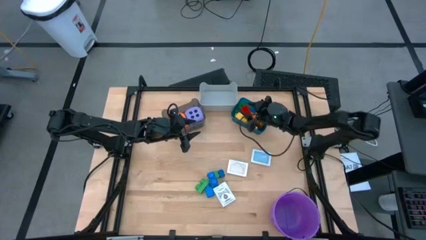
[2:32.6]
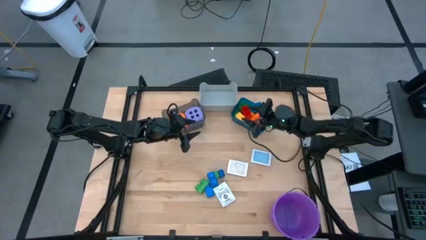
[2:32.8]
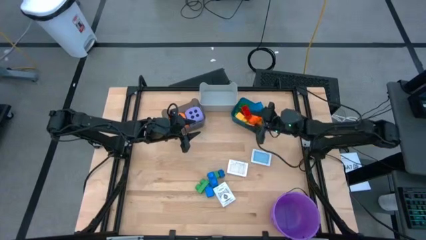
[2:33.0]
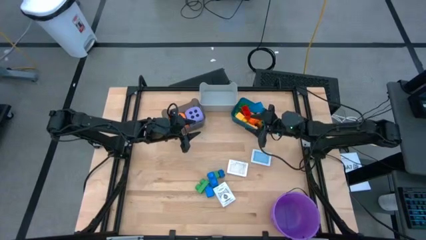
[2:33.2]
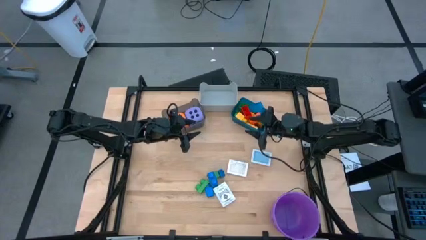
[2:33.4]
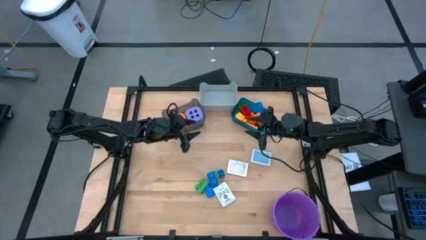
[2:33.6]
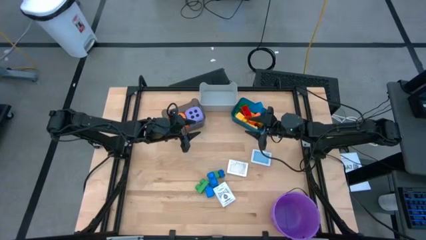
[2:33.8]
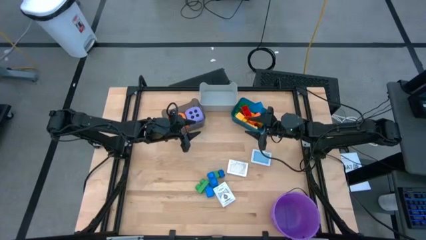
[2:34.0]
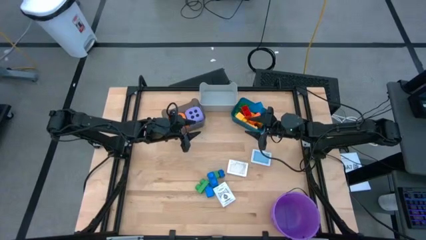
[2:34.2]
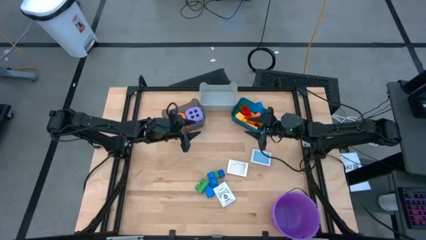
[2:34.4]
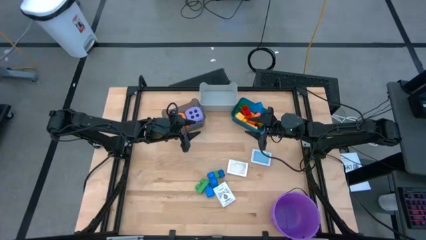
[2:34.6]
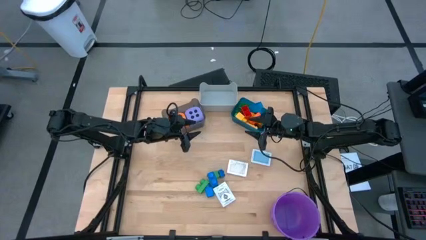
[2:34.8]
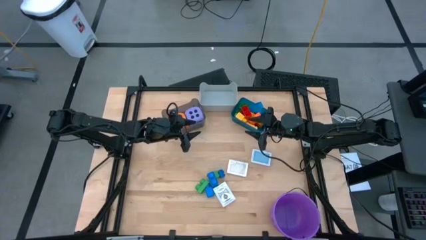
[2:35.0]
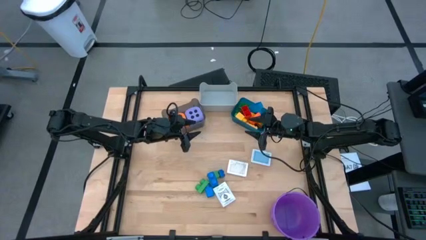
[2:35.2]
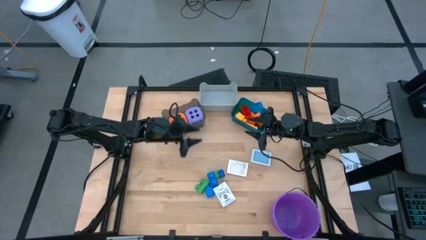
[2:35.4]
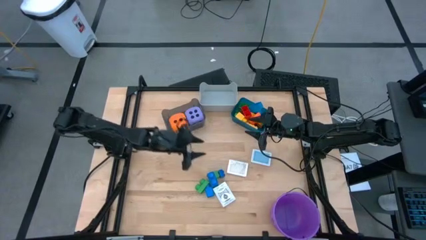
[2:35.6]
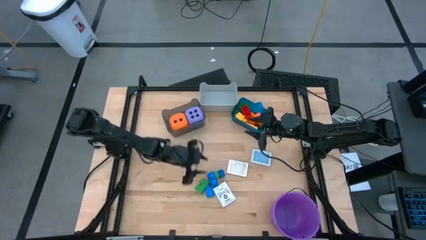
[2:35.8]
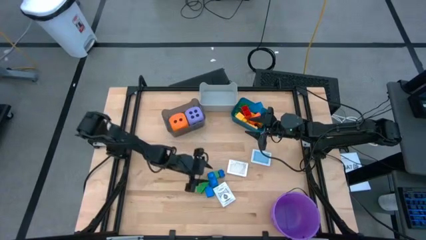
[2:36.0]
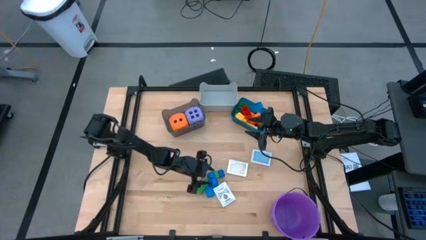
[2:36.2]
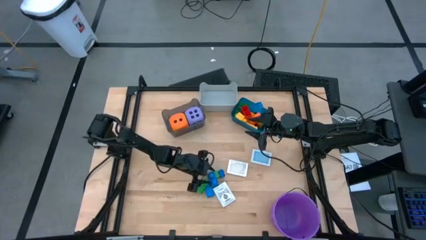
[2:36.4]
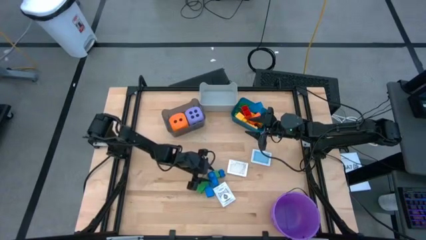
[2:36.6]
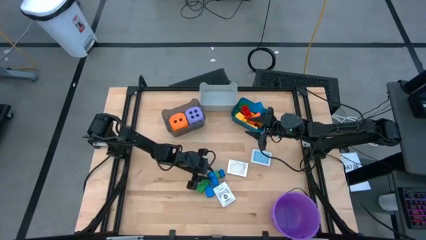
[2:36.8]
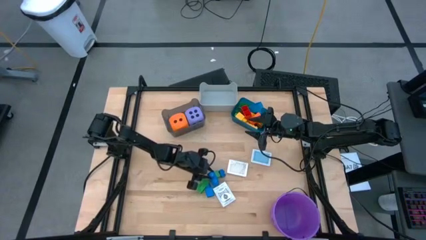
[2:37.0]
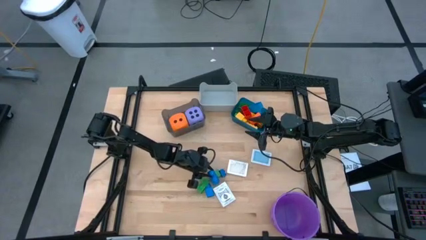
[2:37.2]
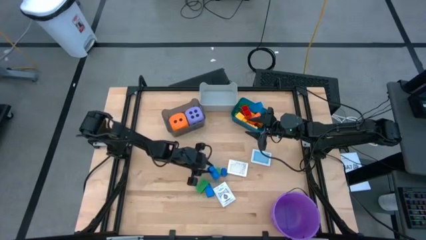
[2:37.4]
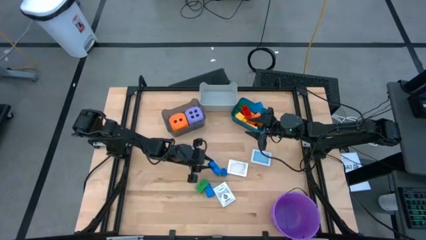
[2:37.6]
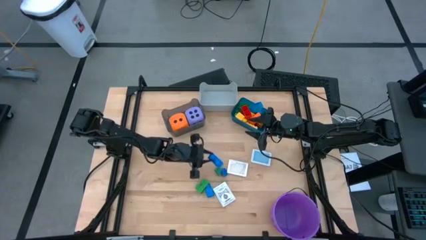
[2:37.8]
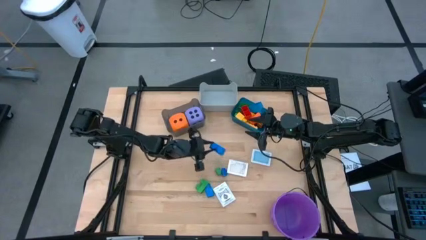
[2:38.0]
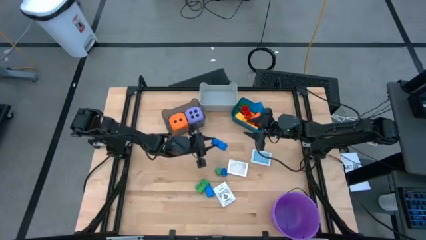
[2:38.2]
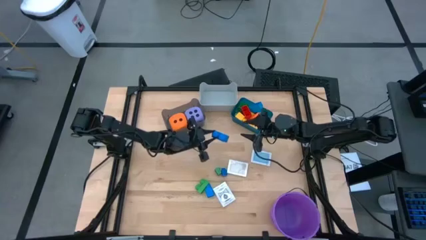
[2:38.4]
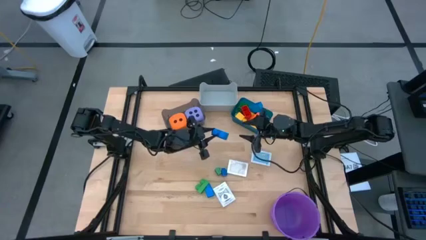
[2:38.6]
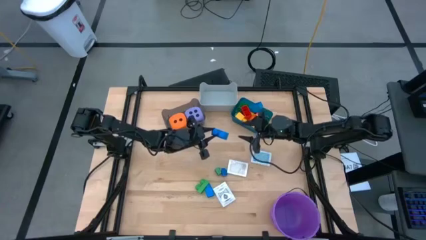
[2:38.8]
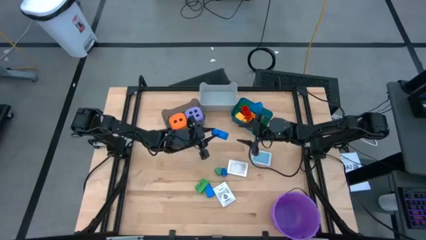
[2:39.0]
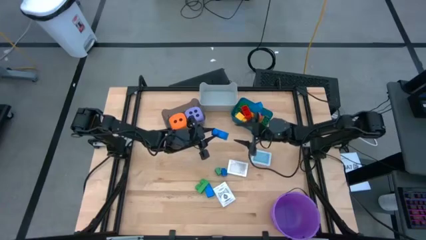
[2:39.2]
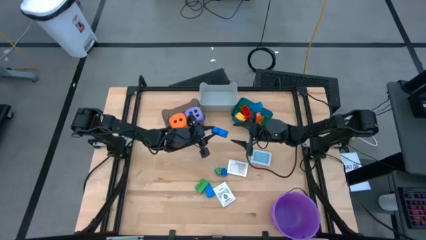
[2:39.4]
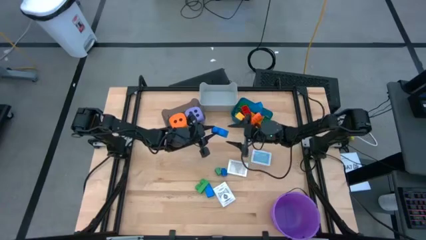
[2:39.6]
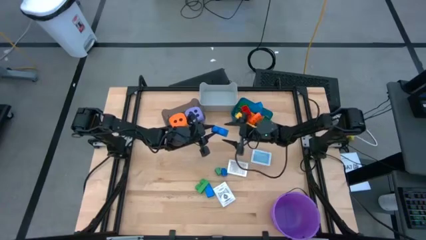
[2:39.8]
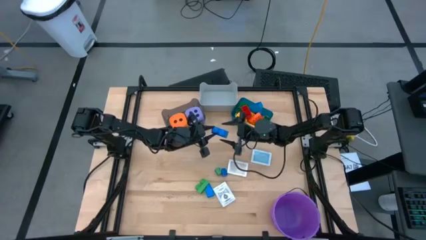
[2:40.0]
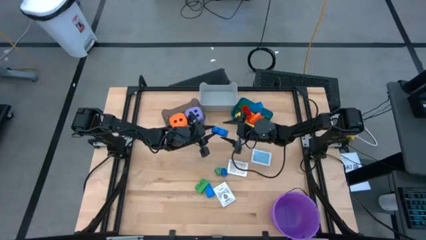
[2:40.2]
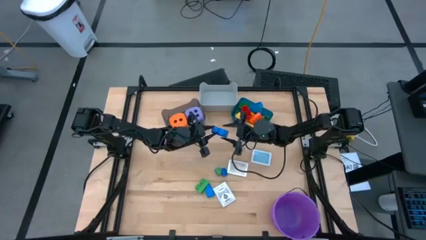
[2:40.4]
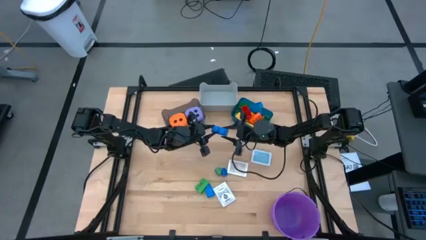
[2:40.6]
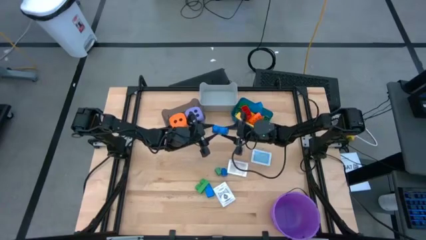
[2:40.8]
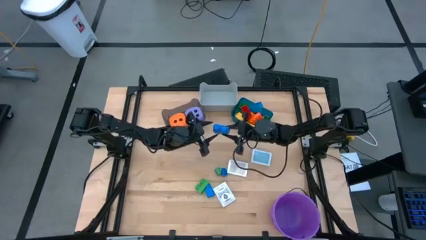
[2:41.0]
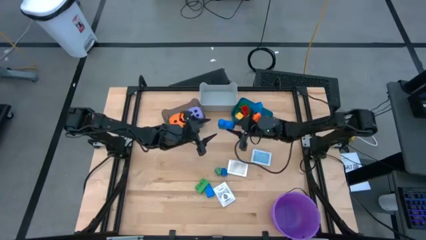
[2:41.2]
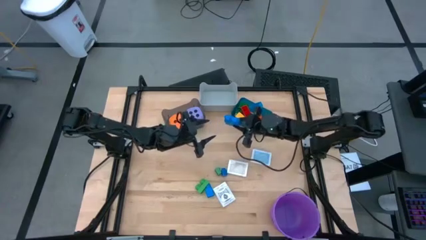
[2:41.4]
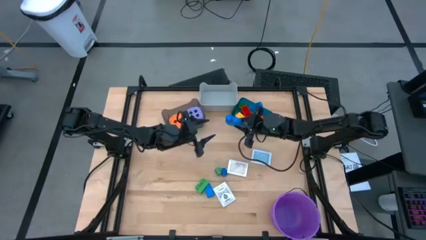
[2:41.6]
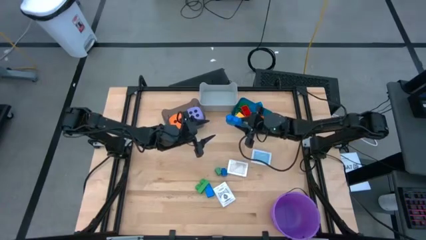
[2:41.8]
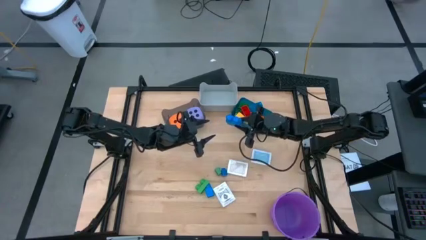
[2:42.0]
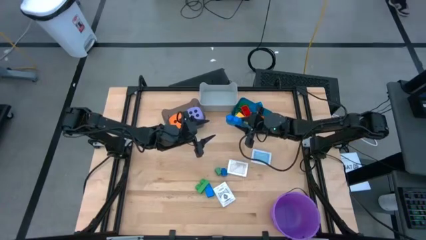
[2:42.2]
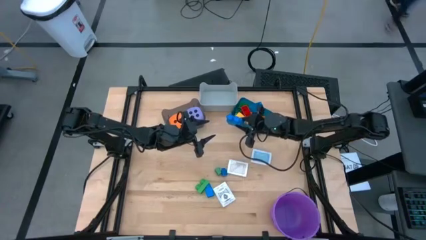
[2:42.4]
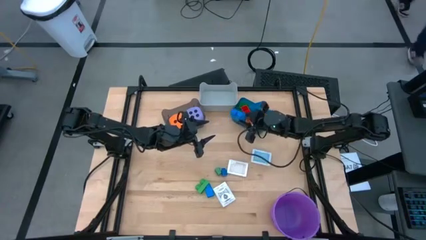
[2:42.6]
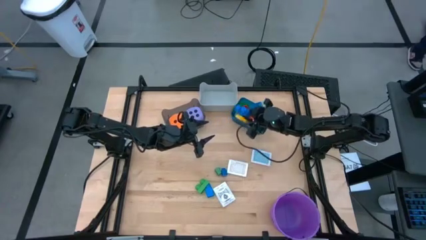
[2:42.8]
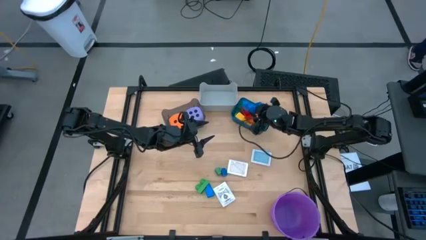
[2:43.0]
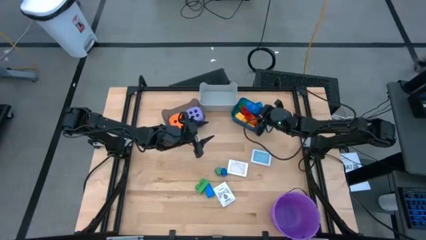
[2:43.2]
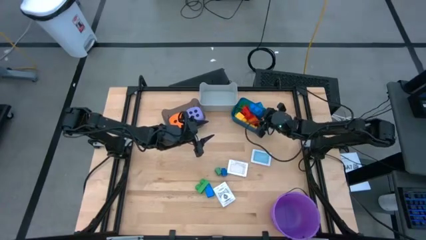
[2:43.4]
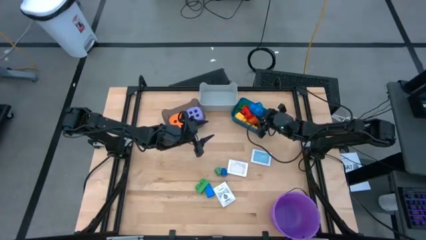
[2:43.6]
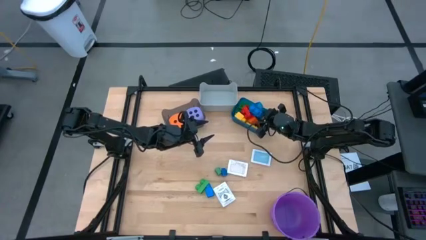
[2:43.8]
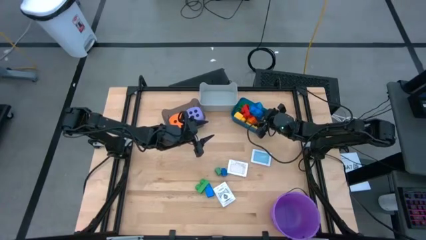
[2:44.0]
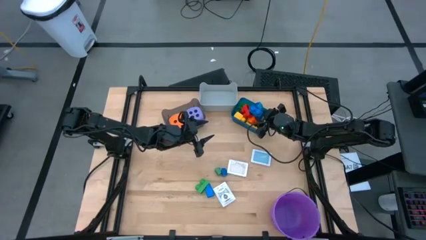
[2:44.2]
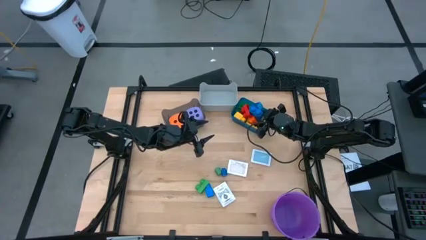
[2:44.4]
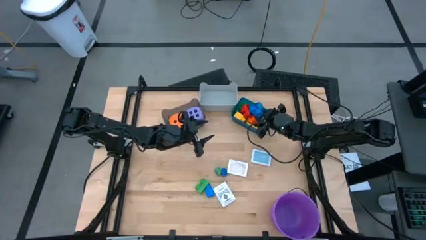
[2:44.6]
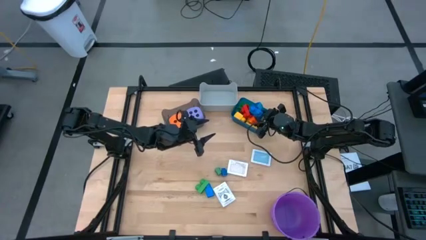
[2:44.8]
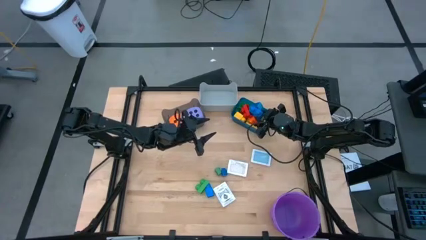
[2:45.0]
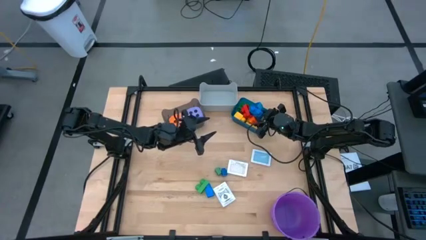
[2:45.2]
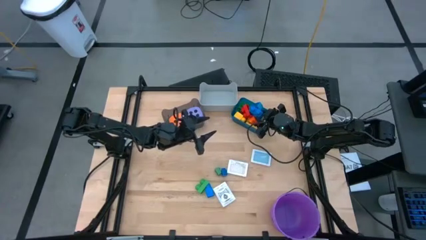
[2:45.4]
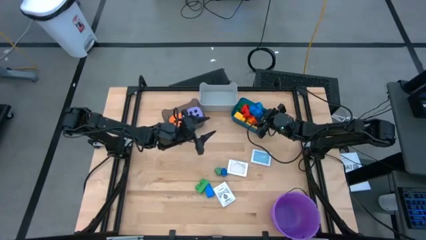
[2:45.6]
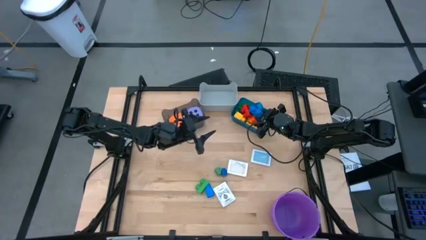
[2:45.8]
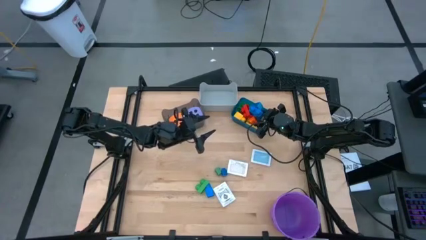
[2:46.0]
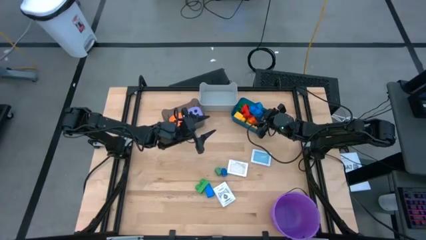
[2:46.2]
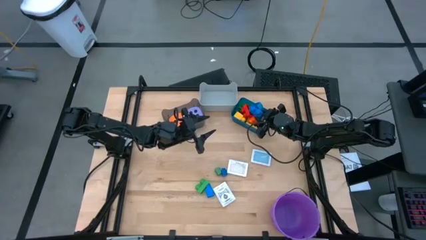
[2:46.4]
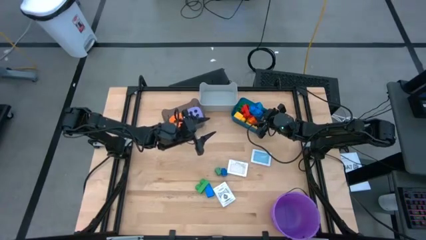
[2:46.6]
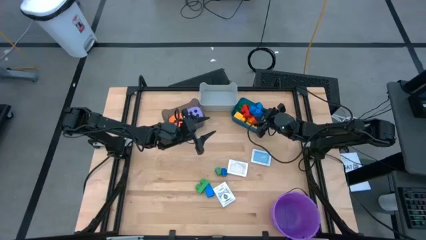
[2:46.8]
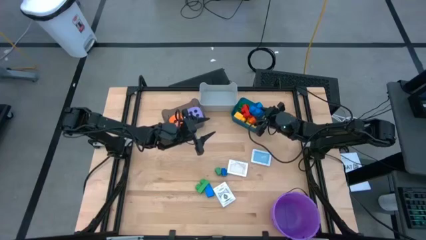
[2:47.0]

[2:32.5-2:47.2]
Task: Pick & Place Toys
Put the blue 2 studs game piece into the blue bin

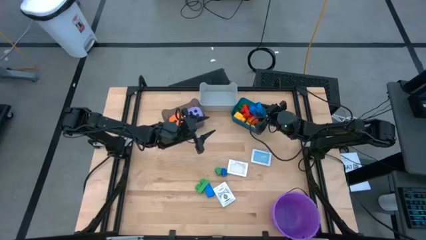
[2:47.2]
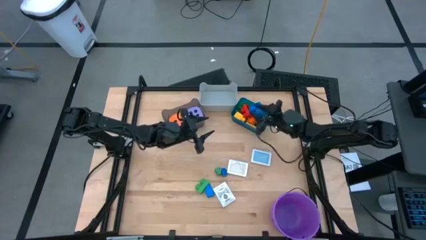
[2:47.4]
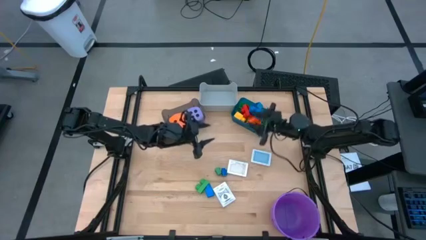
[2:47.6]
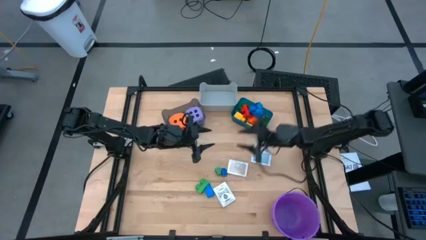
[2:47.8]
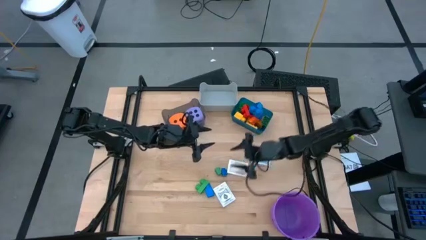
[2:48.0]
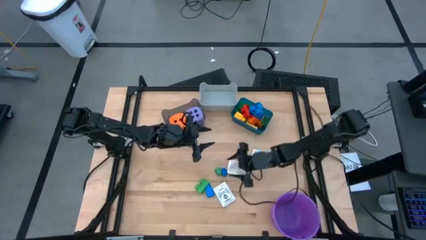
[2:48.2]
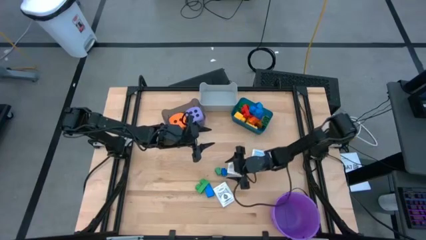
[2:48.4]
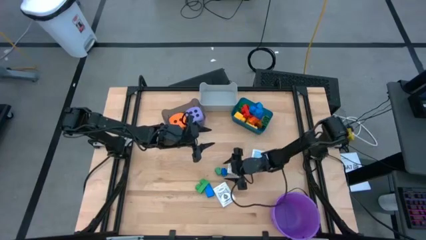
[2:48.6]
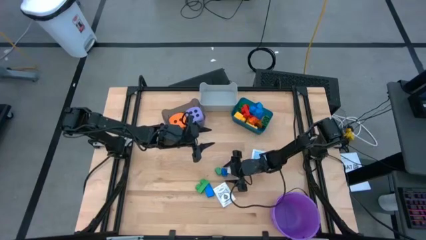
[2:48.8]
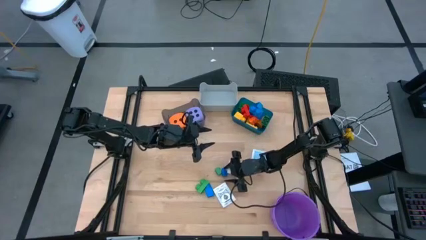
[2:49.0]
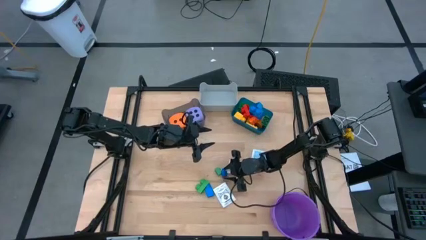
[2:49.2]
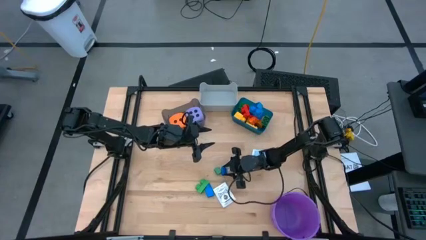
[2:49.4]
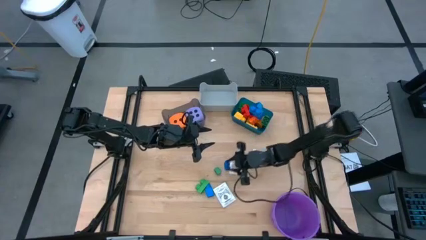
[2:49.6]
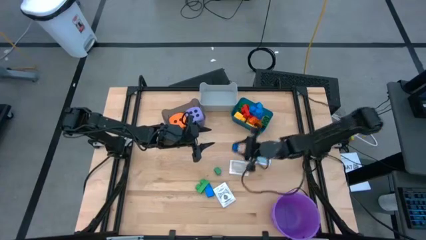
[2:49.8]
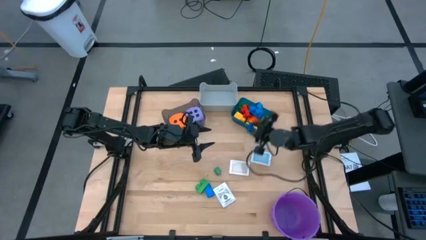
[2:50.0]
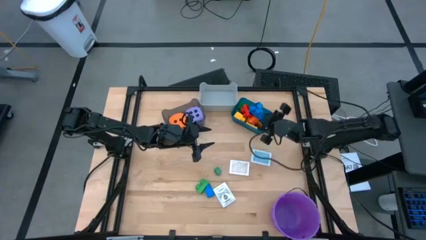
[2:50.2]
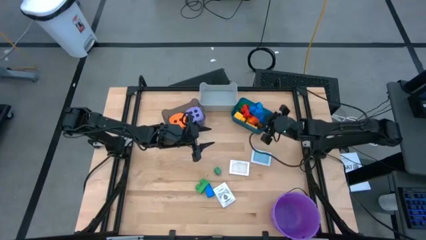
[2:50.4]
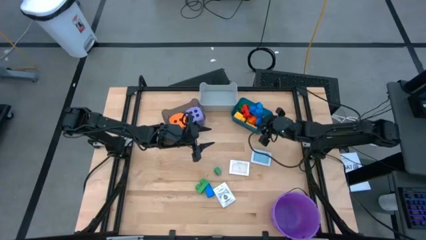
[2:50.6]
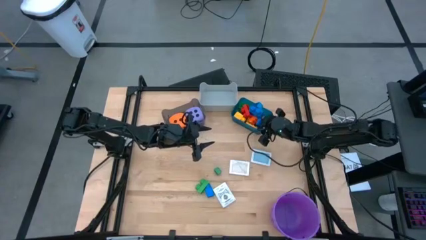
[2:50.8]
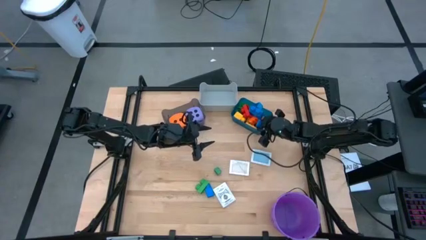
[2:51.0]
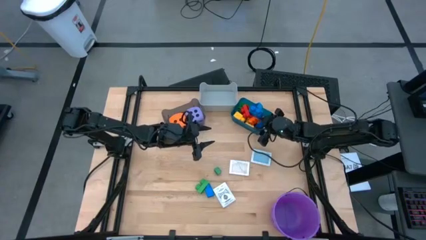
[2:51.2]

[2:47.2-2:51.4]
Put the blue 4 studs game piece into the blue bin
